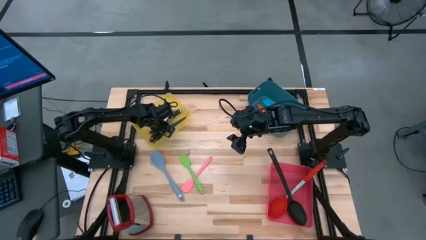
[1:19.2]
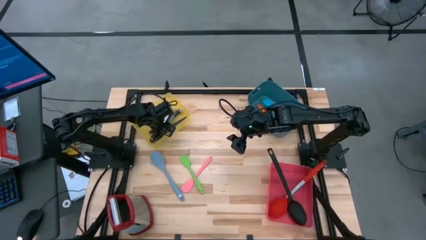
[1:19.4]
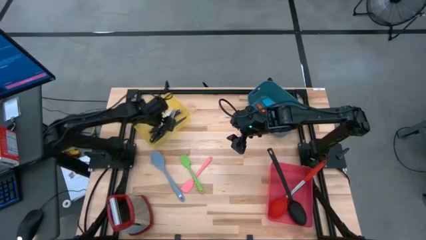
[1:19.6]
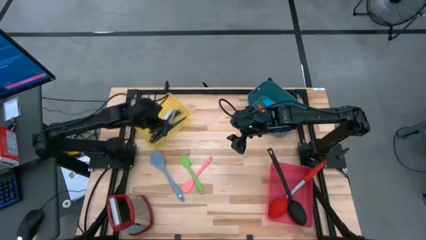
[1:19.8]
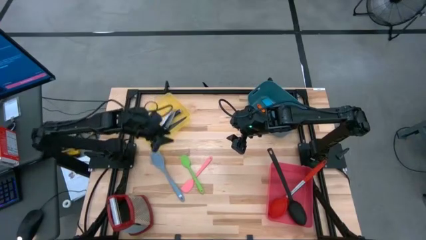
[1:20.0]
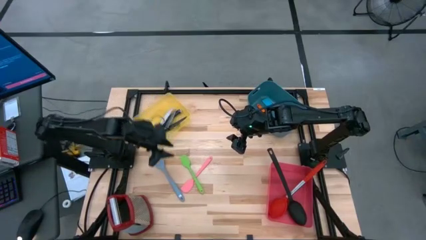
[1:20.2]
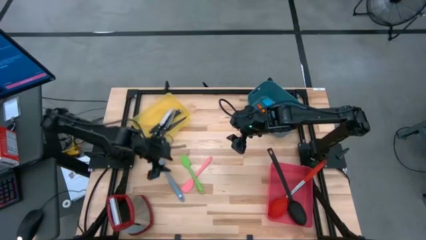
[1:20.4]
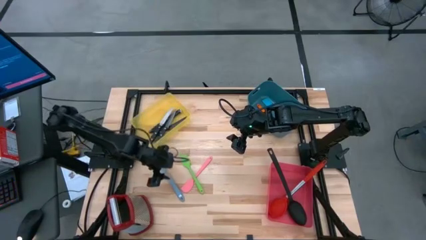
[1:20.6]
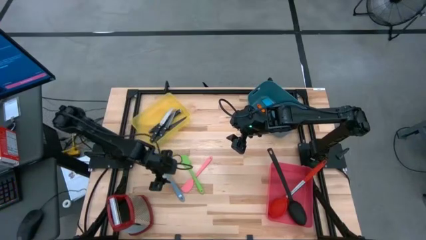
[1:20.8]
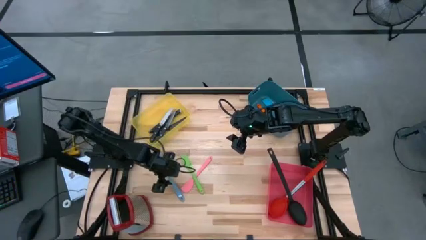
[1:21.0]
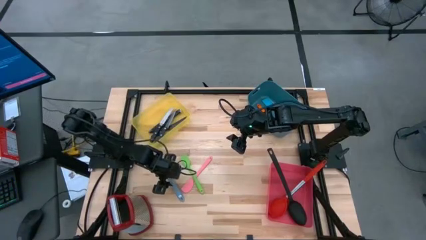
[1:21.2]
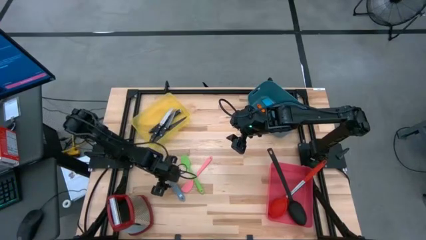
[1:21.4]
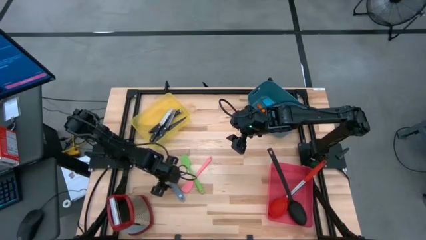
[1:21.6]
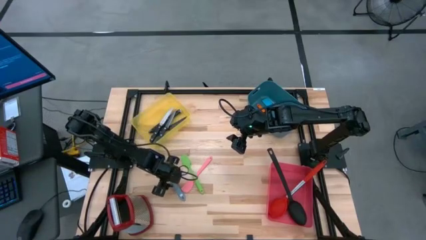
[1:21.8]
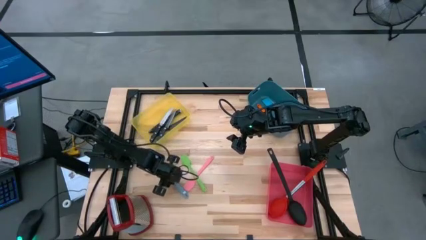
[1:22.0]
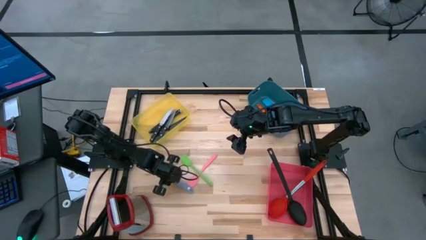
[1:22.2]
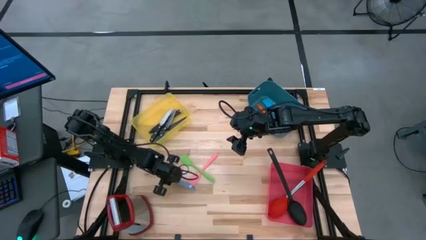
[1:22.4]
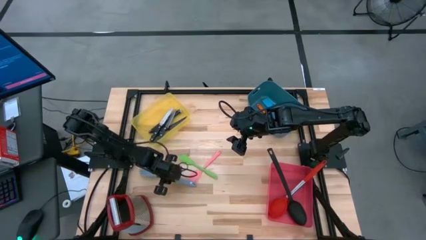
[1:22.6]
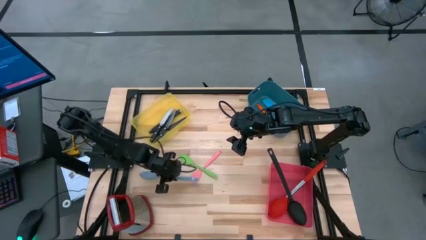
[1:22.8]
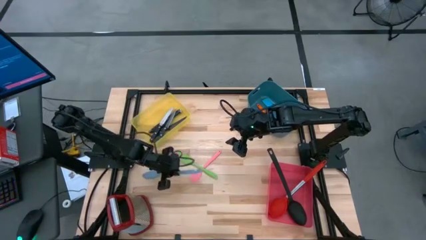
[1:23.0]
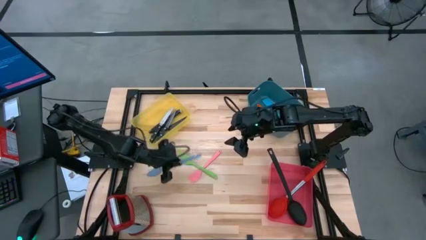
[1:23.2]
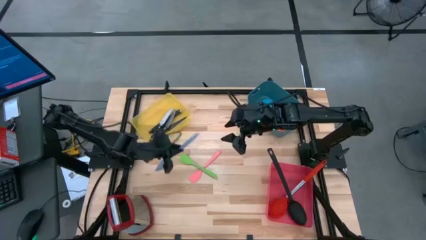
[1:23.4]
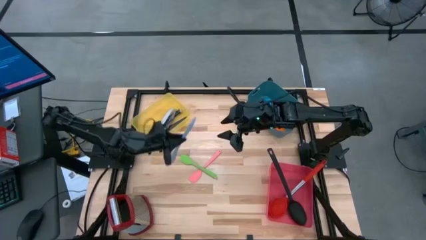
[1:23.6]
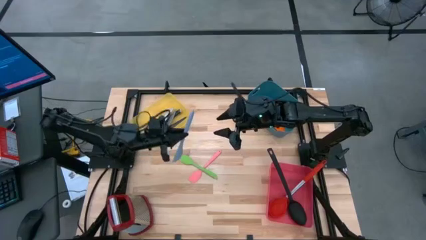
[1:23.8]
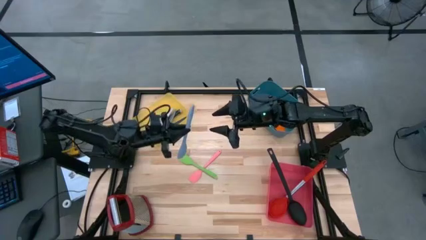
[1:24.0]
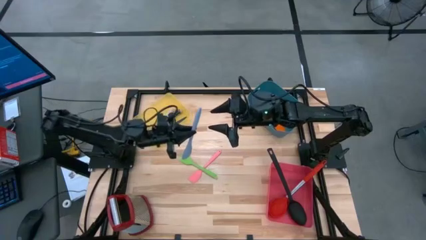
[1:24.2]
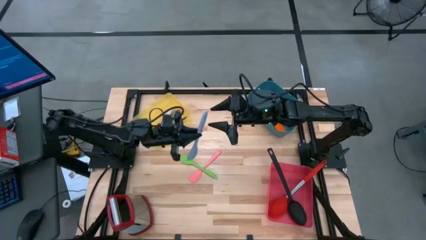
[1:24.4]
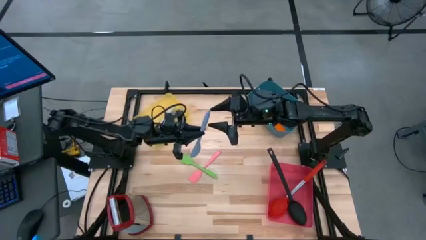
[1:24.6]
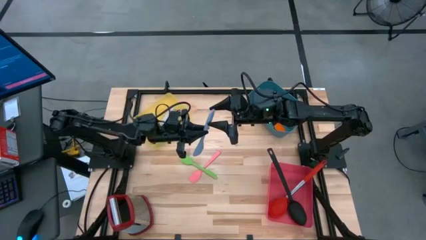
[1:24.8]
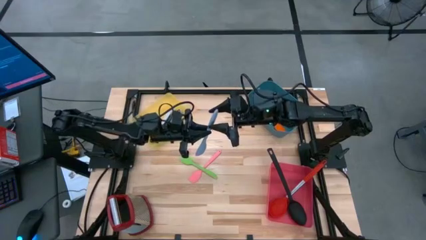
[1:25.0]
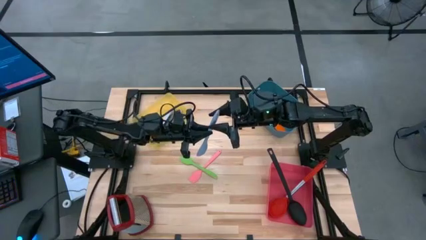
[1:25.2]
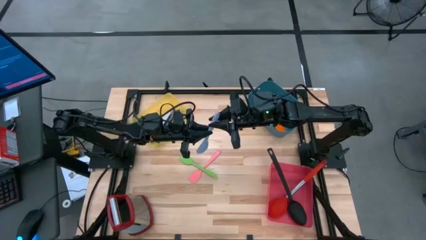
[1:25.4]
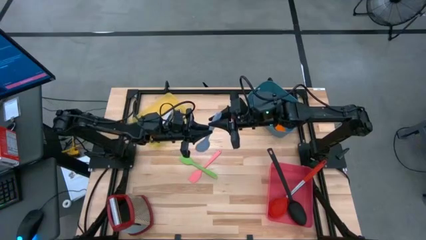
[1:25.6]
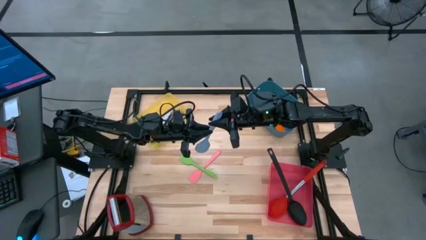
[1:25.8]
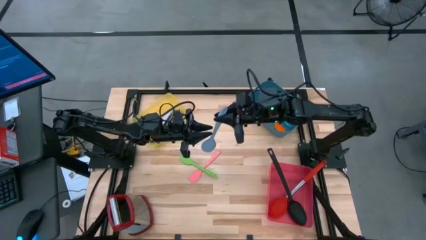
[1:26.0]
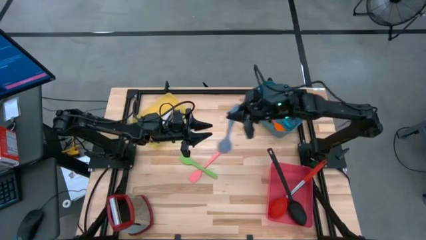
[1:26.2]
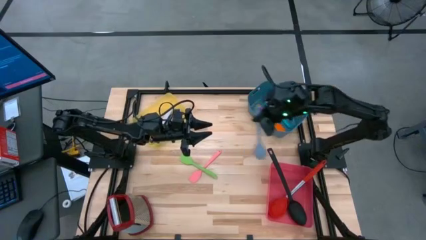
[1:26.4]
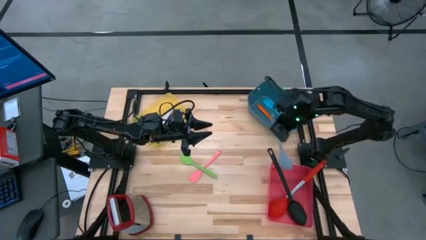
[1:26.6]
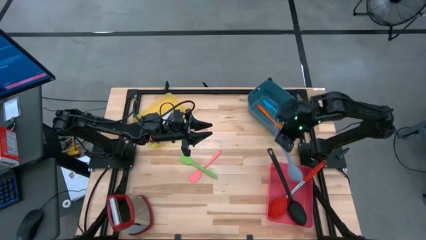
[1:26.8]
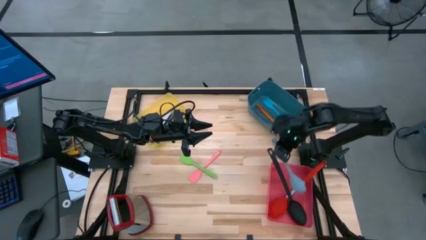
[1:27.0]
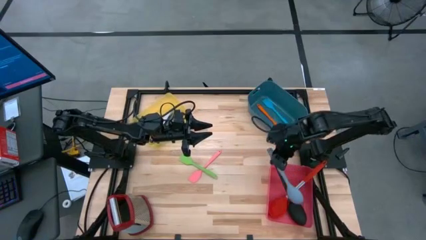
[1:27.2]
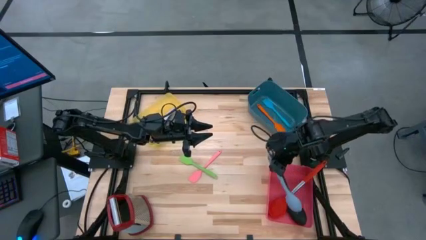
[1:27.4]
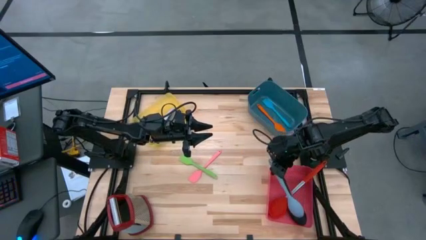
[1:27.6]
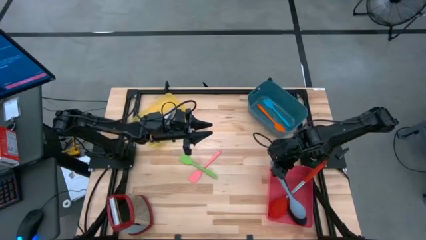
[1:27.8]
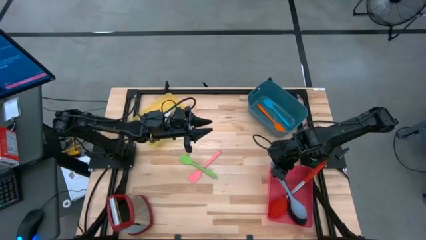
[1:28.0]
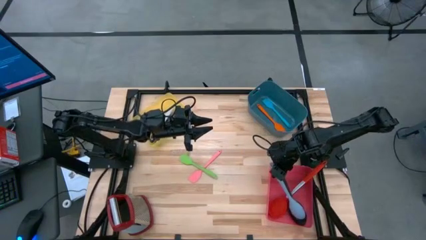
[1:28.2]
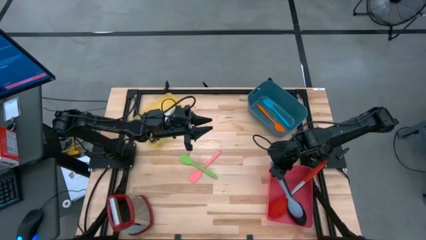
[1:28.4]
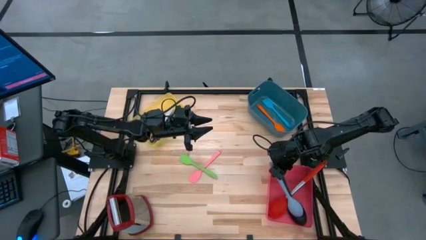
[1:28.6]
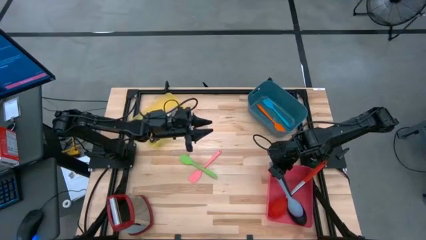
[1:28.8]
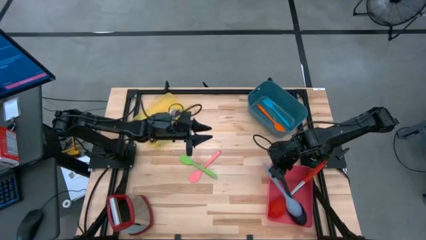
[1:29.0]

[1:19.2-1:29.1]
Task: Pick & Place Kitchen Items
Put the blue serving spoon into the red bin

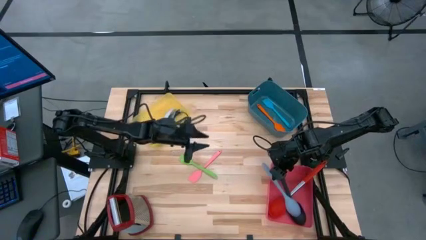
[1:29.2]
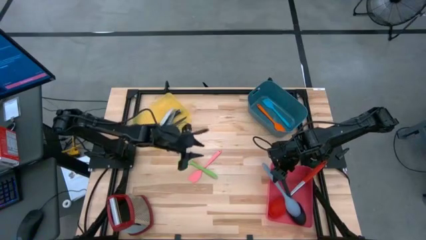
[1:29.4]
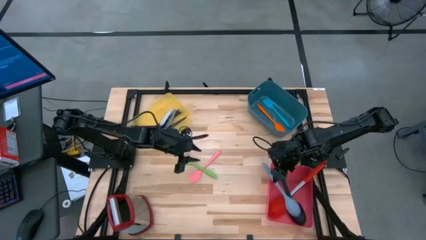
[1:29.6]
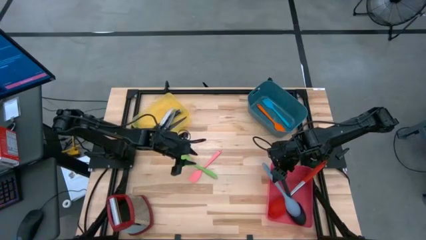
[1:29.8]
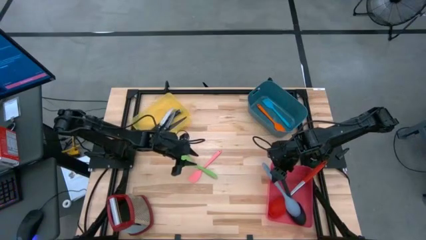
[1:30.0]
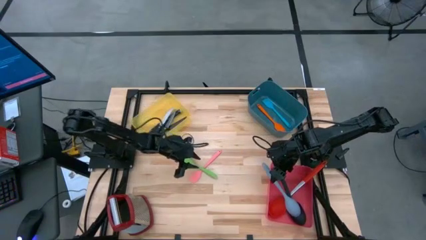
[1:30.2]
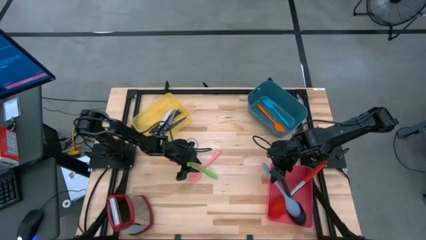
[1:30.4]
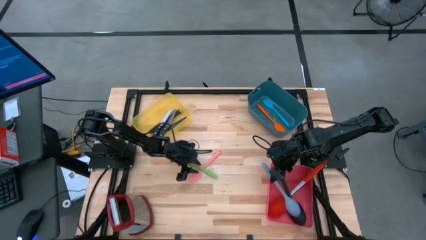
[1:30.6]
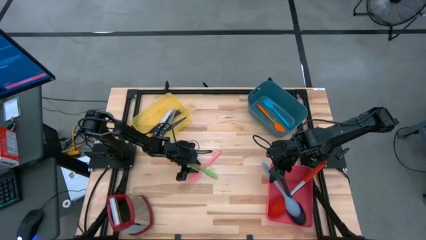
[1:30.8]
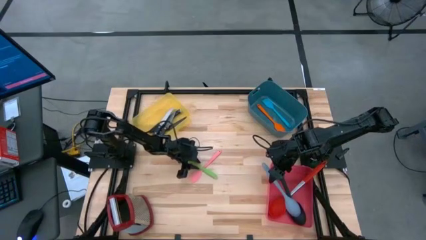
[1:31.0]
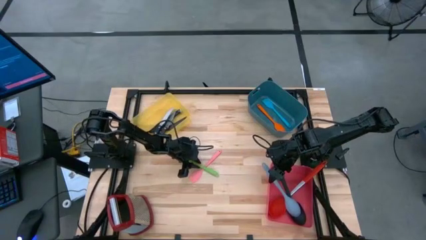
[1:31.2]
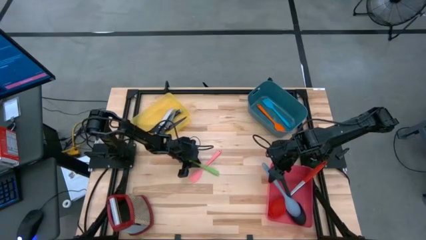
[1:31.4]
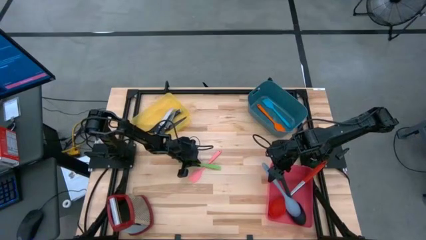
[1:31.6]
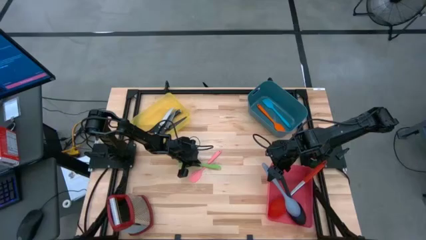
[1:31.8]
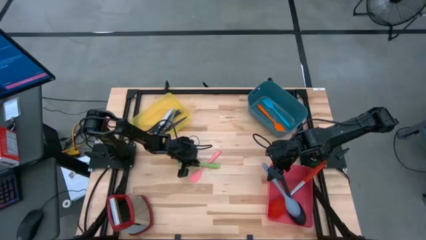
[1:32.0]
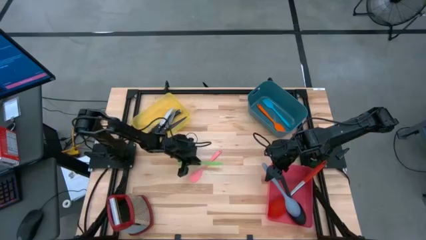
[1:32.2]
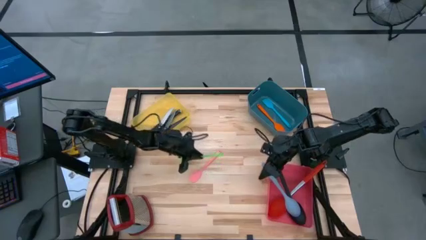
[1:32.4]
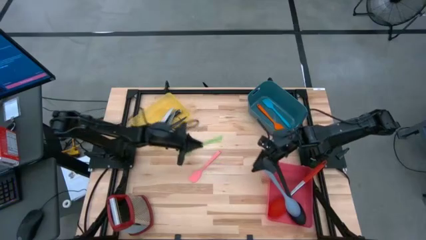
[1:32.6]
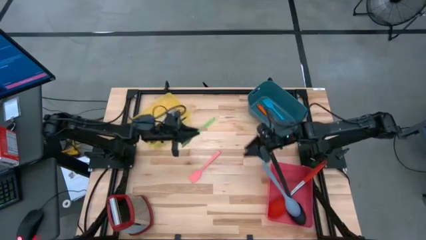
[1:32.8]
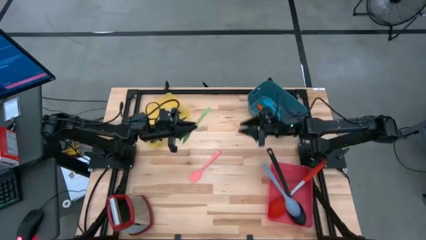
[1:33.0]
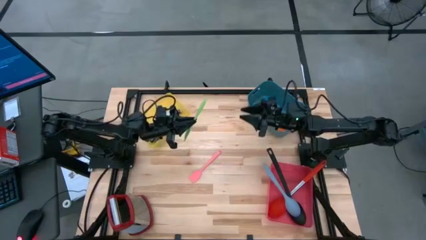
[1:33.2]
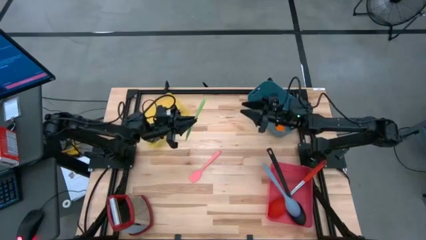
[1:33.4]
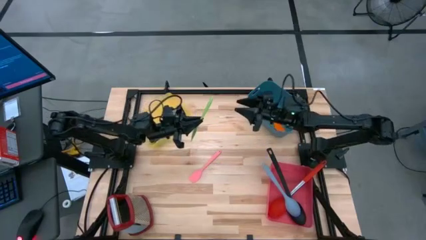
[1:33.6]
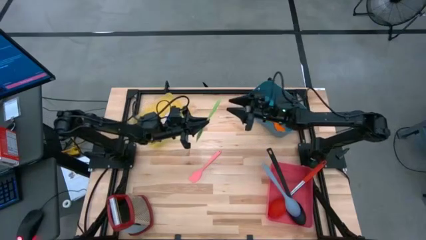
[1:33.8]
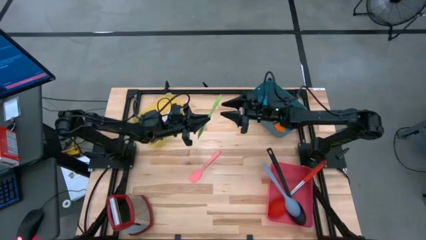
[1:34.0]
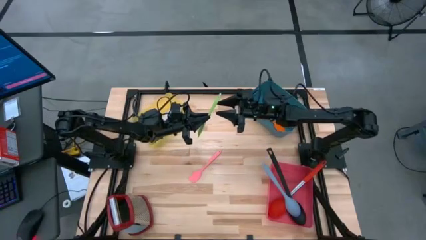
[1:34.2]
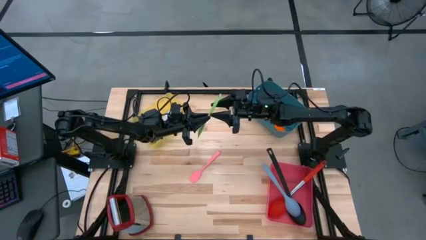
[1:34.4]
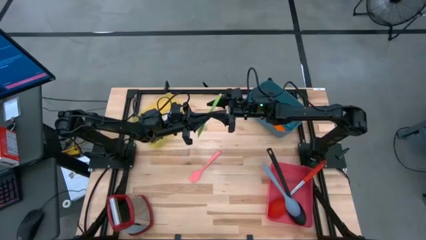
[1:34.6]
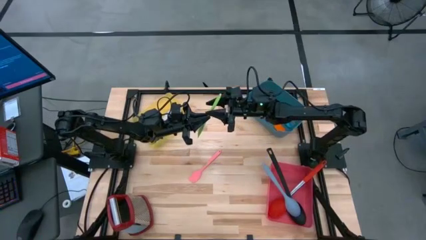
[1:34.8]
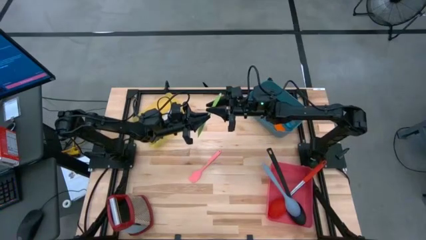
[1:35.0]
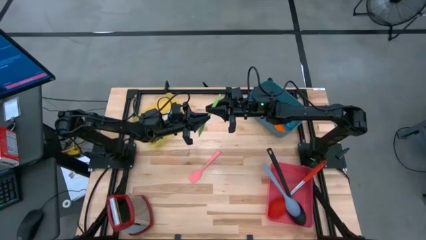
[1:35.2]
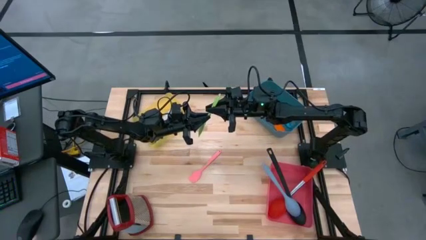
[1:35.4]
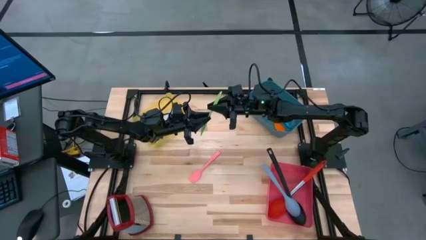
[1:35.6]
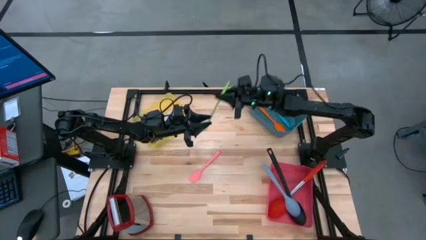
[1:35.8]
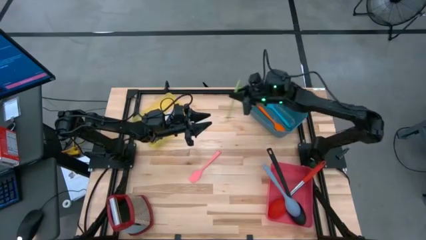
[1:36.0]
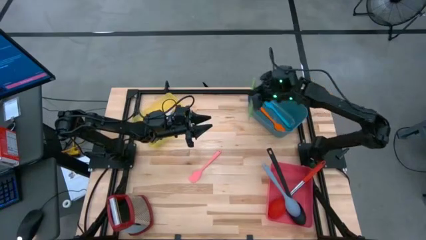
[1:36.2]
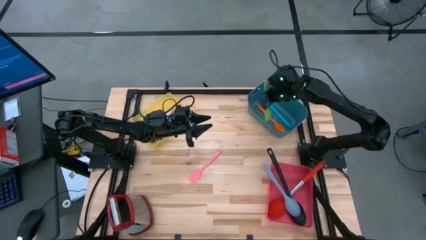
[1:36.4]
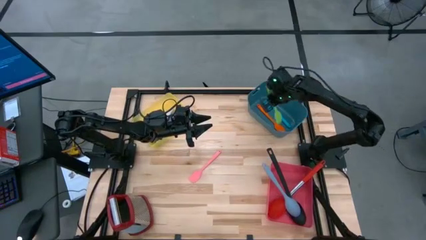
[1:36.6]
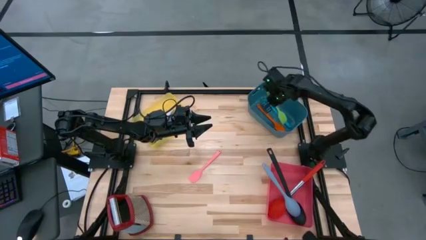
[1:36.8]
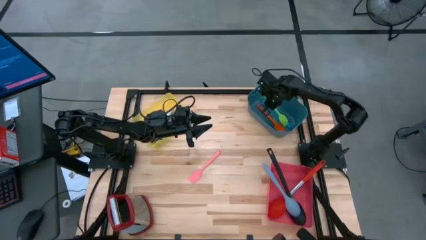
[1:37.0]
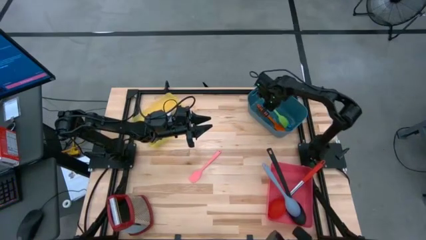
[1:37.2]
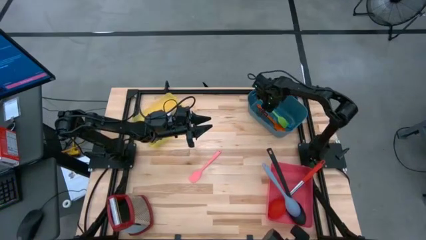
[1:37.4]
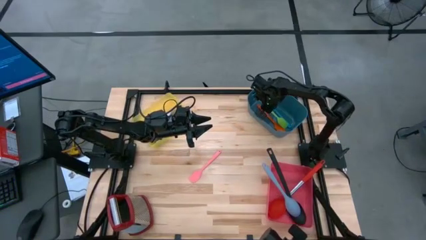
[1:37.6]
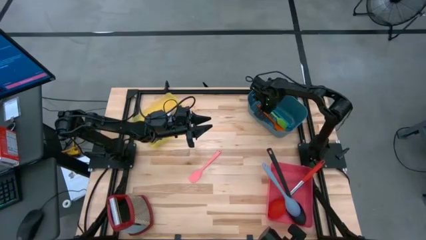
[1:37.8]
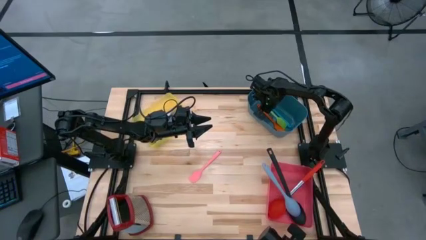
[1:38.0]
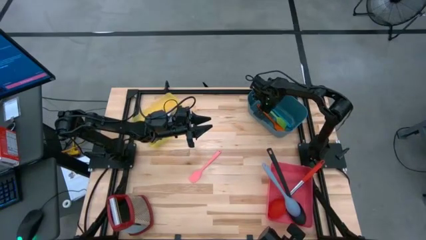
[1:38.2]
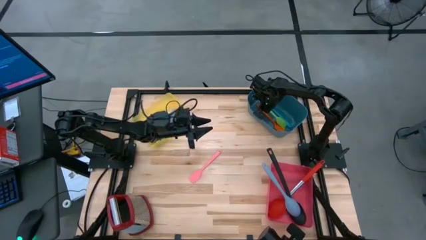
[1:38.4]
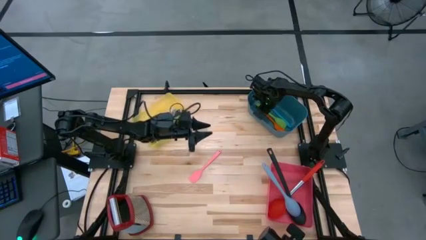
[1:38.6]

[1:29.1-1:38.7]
Put the green spatula into the green bin
